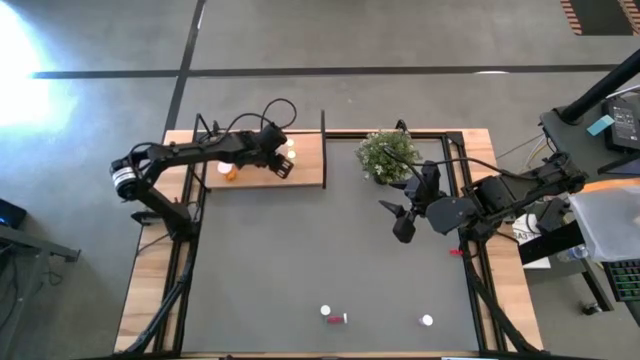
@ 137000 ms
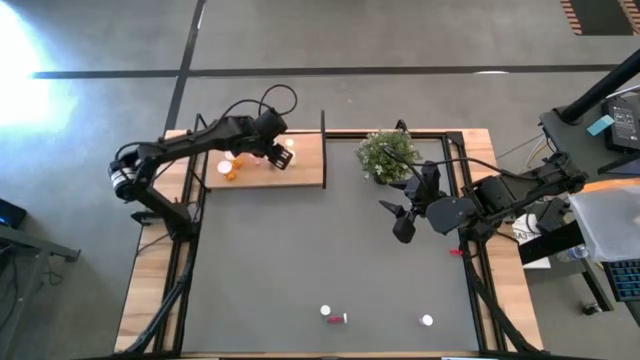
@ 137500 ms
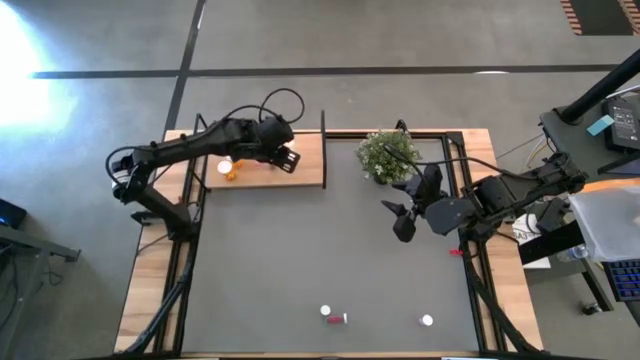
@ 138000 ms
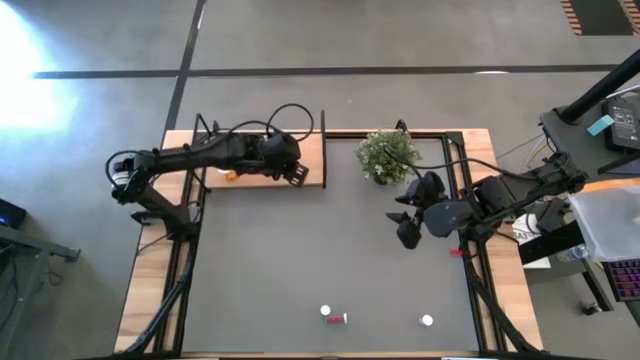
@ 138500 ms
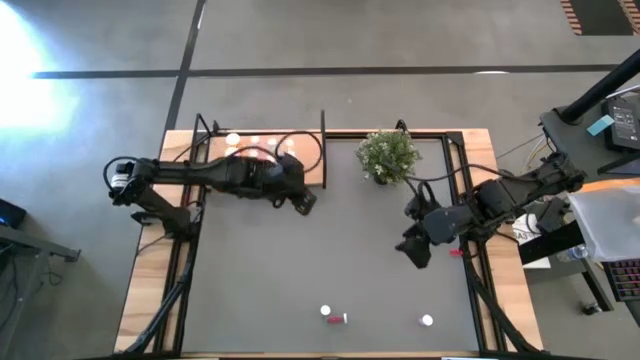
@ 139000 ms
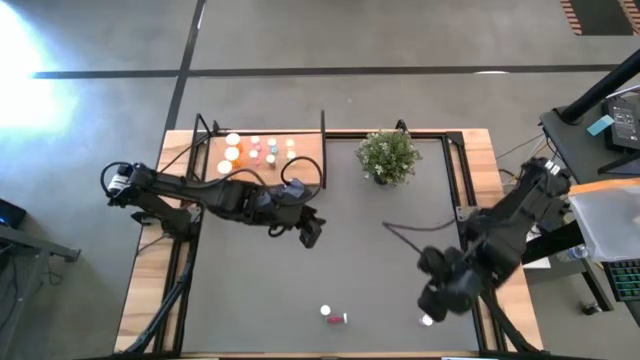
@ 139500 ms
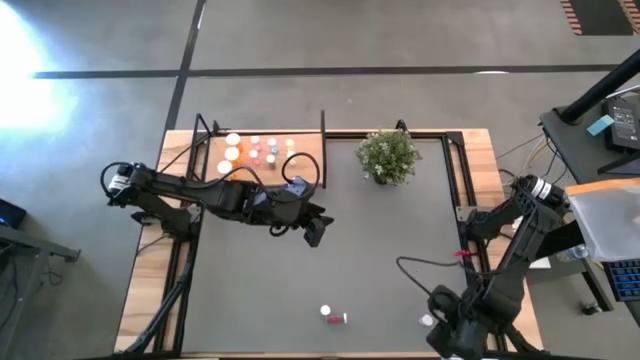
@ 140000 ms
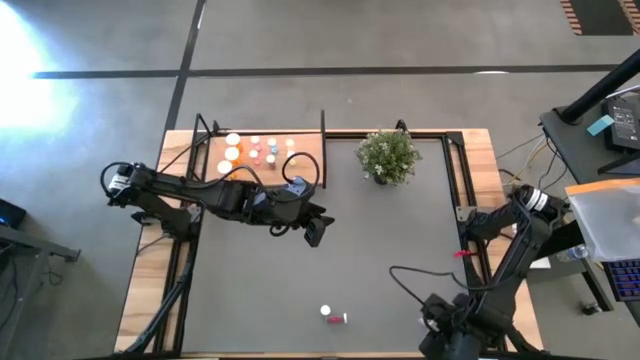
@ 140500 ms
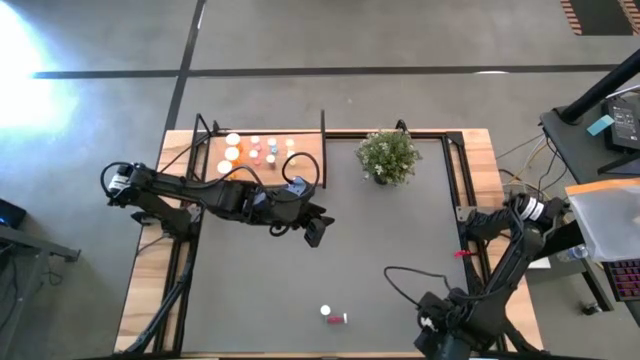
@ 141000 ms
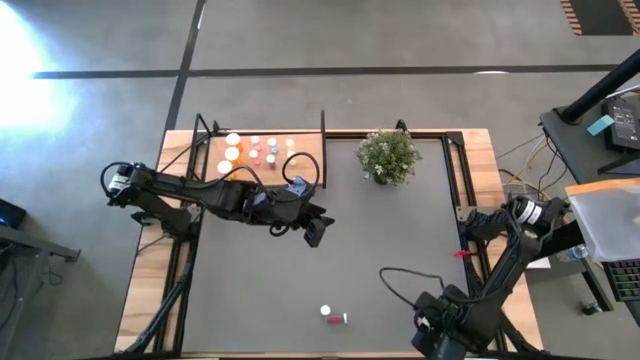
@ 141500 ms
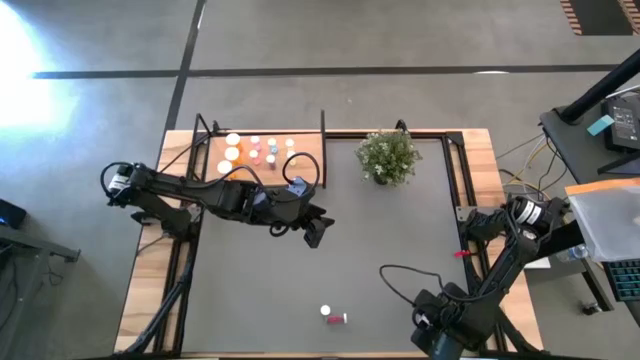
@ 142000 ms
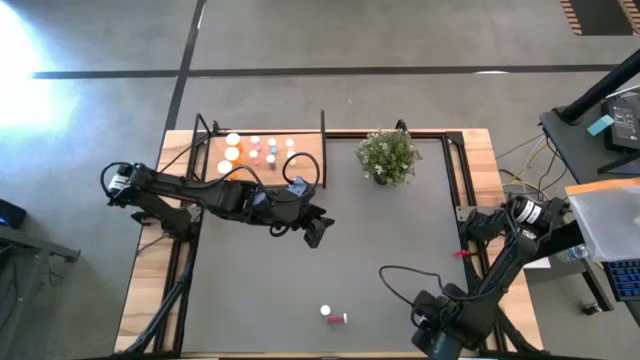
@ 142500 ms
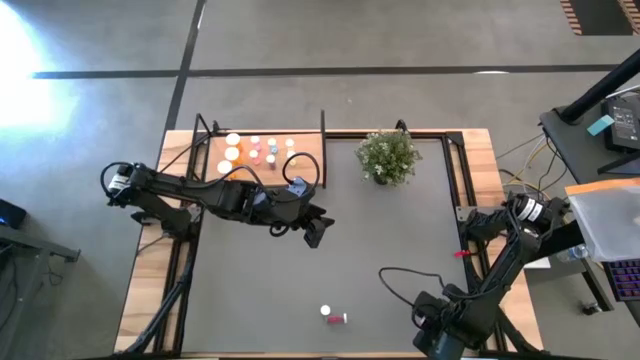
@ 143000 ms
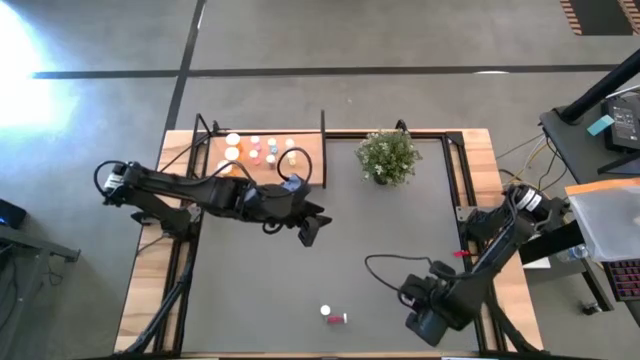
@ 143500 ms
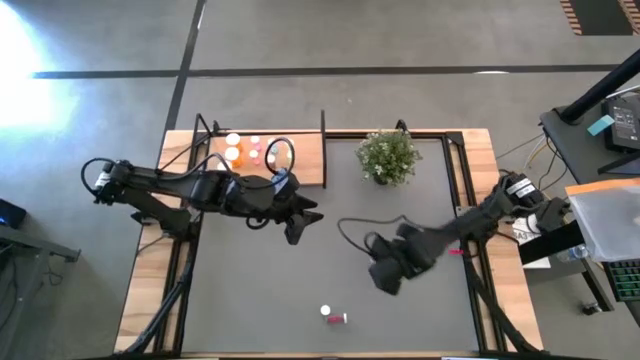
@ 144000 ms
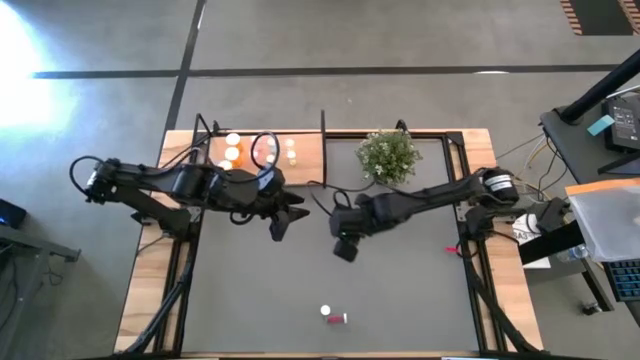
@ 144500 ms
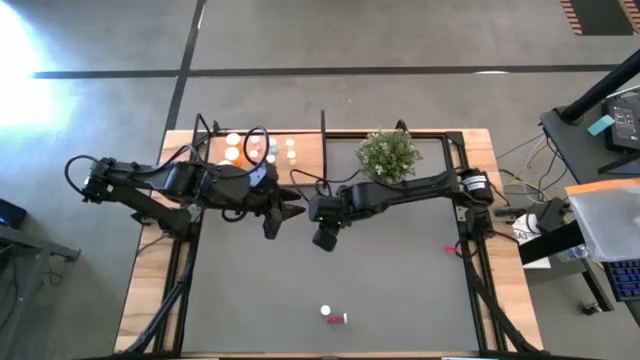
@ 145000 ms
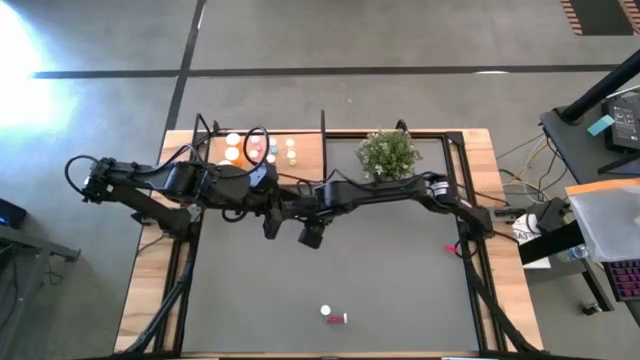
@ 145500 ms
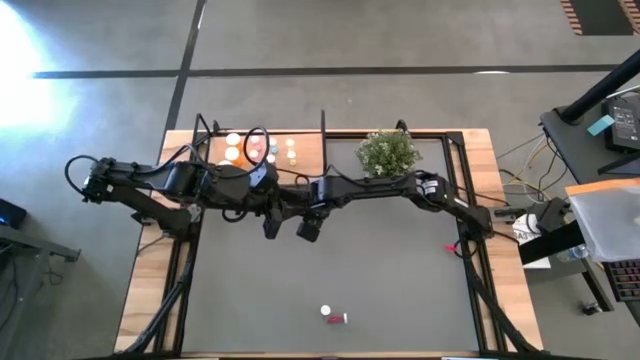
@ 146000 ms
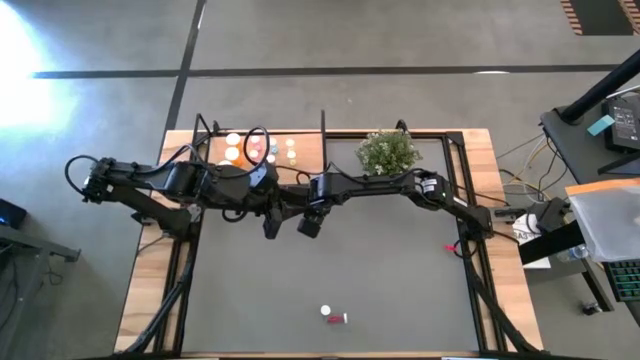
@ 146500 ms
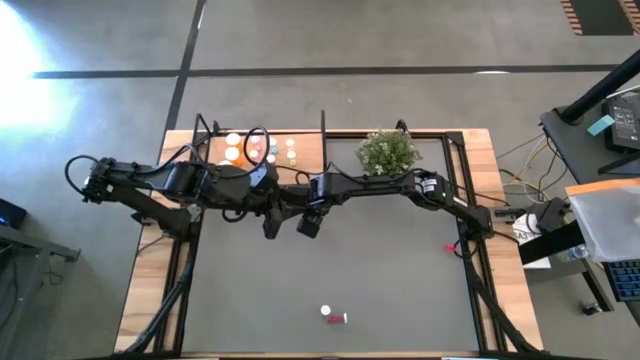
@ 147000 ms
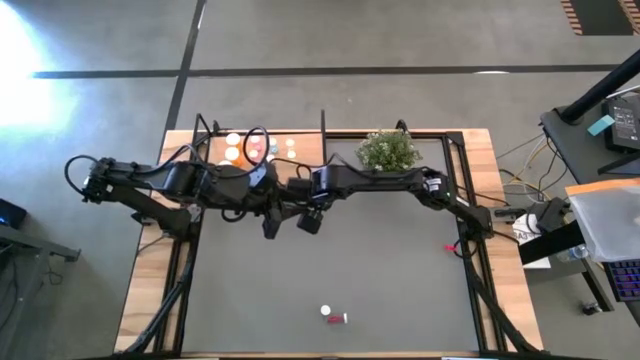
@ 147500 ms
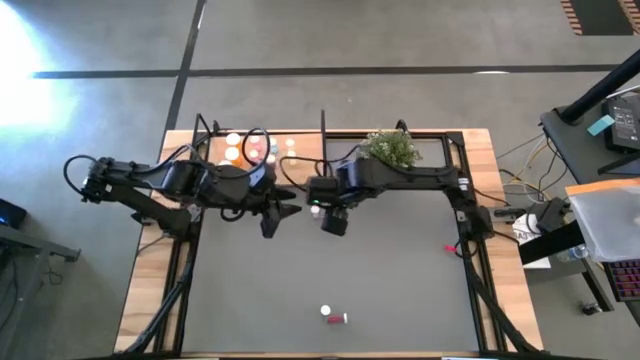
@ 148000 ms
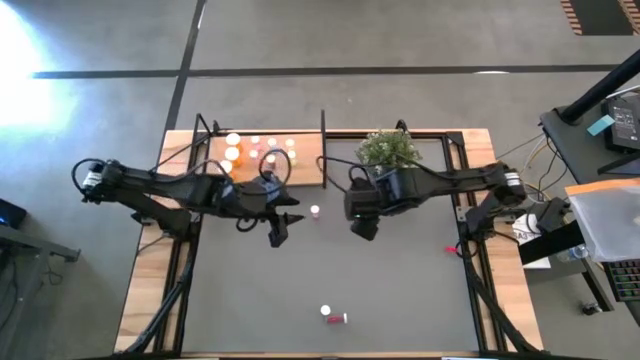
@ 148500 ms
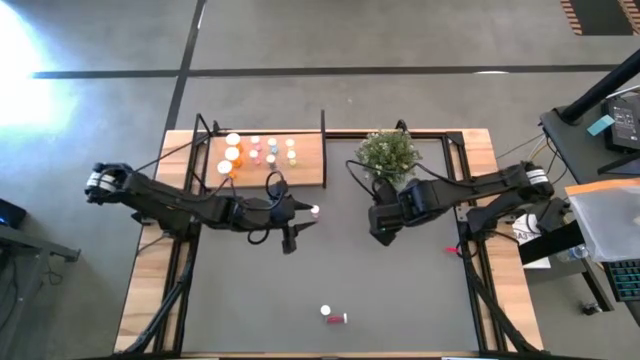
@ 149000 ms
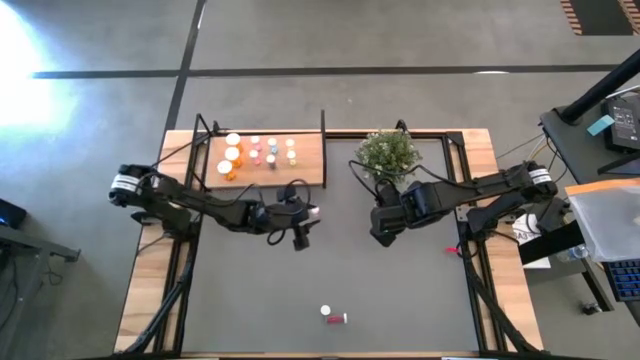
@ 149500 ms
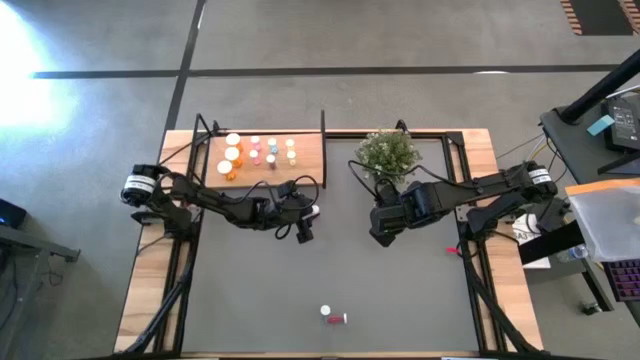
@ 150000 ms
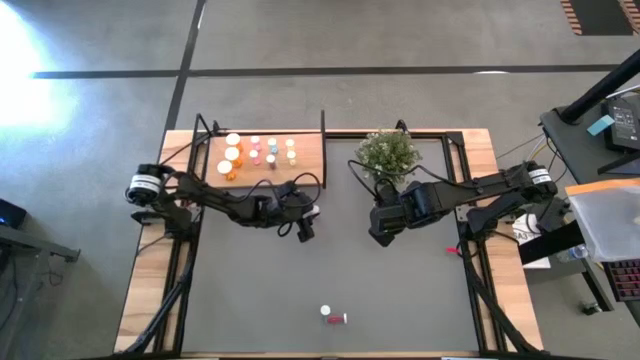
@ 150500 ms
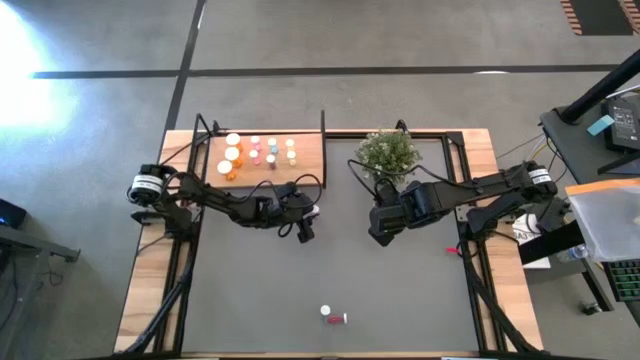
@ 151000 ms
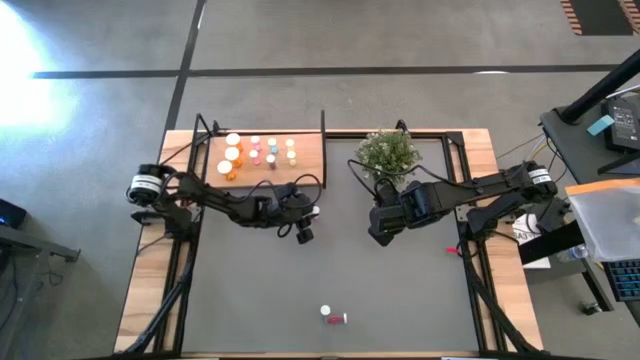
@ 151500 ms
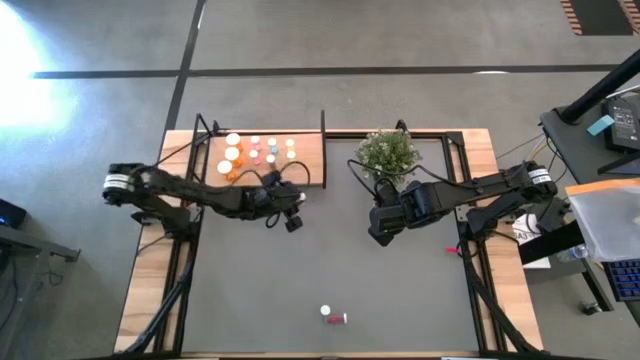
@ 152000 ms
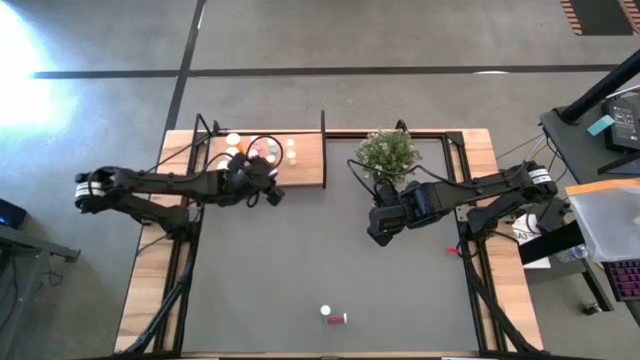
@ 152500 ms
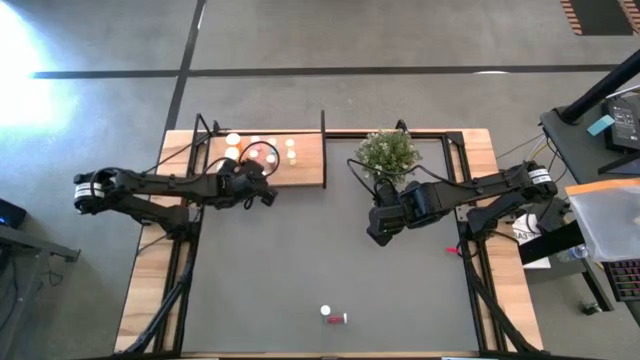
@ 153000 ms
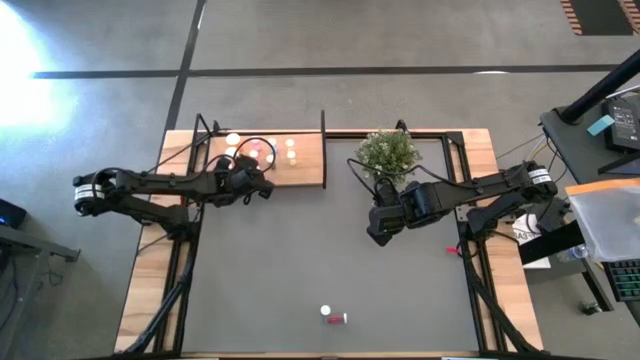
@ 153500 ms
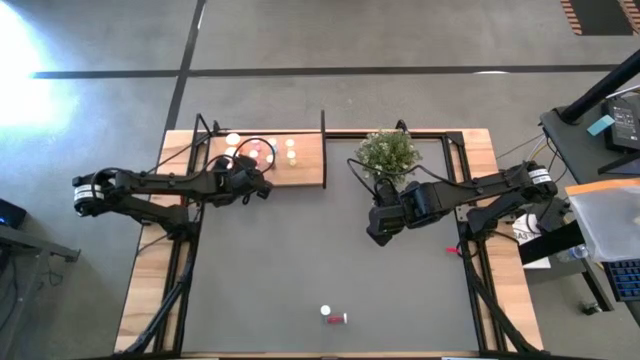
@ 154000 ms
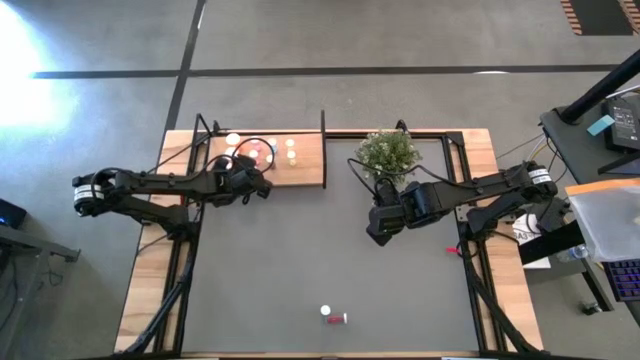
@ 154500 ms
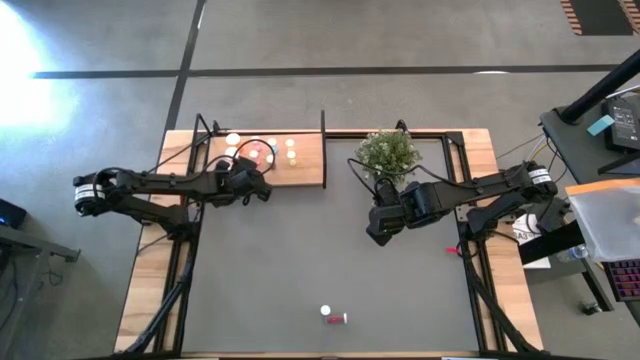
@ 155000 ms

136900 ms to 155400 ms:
Task: Pick and place medicine bottles onto shelf by color
Put the small pink bottle on the shelf aligned with the other small pink bottles

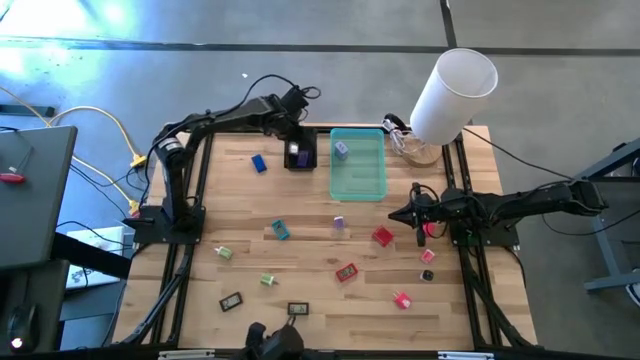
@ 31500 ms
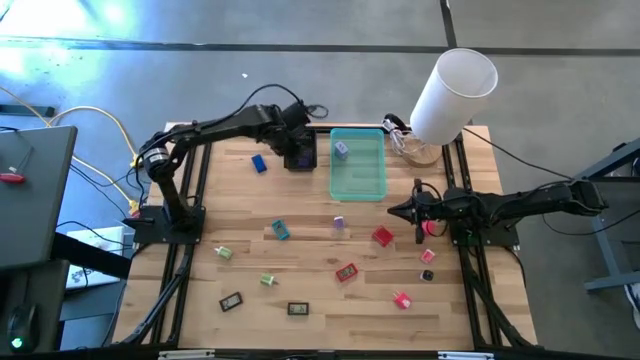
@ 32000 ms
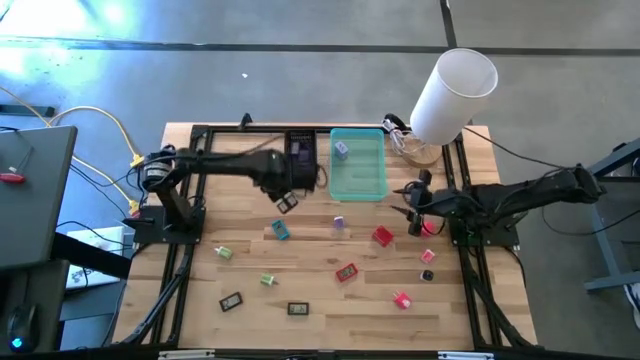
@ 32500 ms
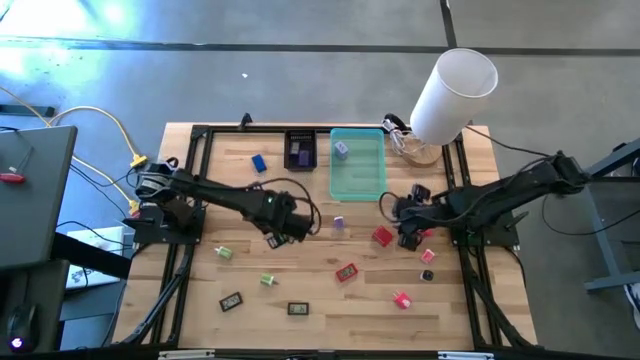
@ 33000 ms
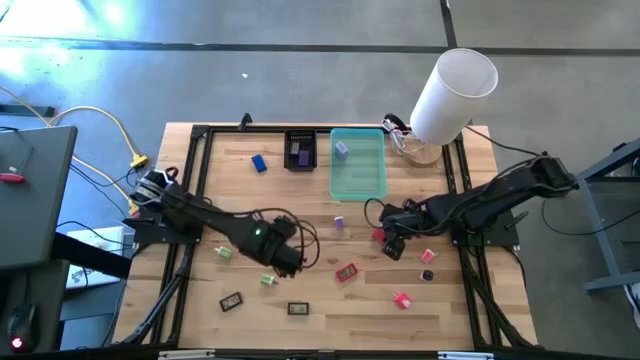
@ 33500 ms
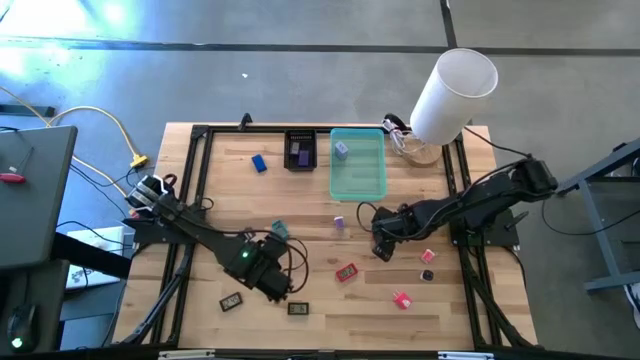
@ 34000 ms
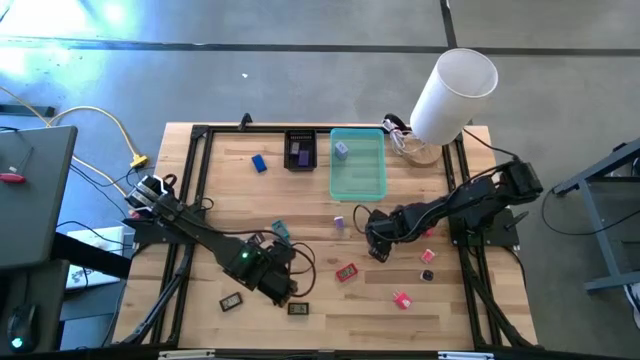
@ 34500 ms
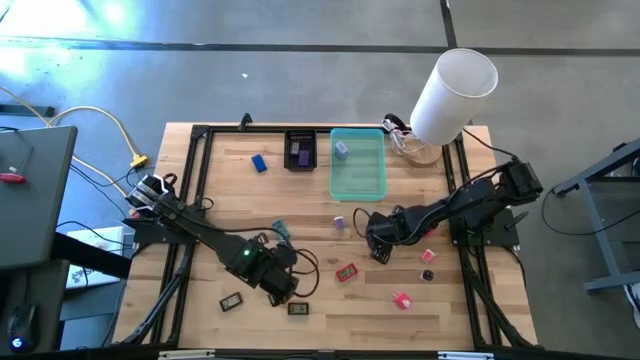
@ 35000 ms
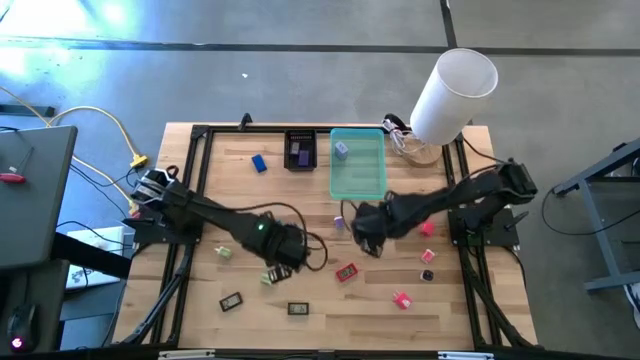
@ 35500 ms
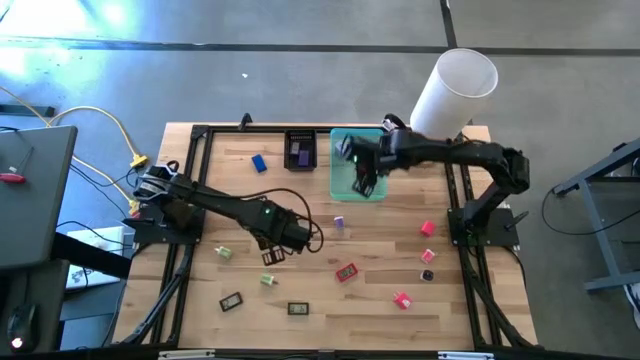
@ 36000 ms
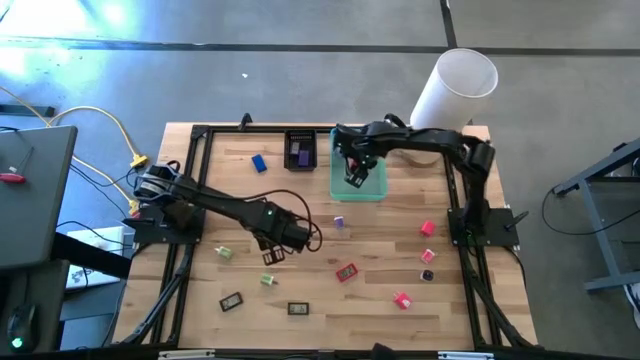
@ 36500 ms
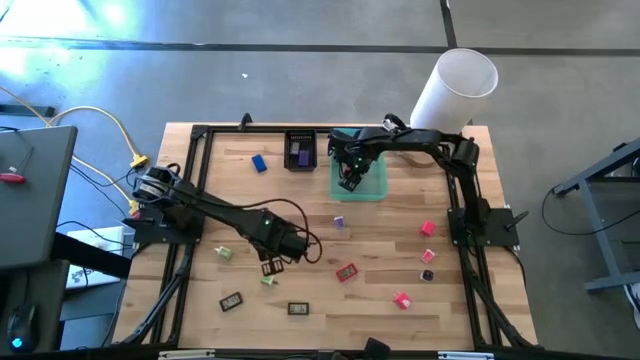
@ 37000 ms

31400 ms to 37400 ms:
Task: Pick & Place Office items
Put the red charger adapter into the blue bin
